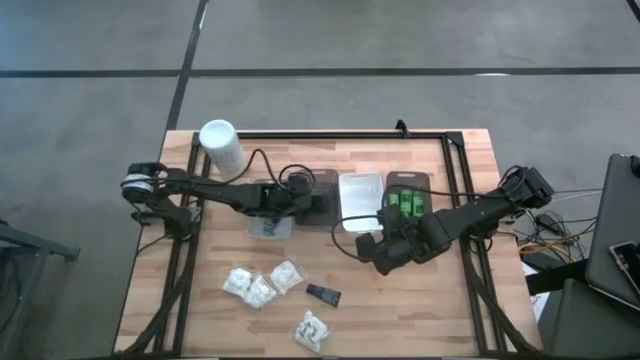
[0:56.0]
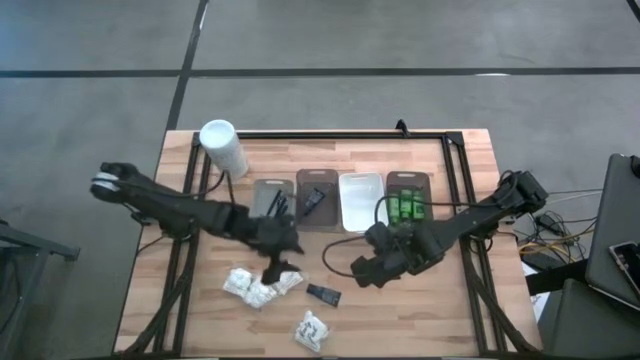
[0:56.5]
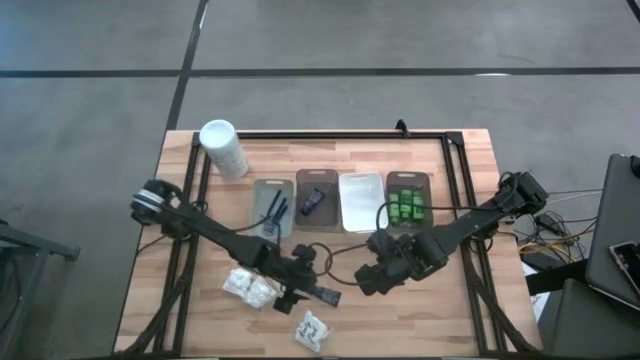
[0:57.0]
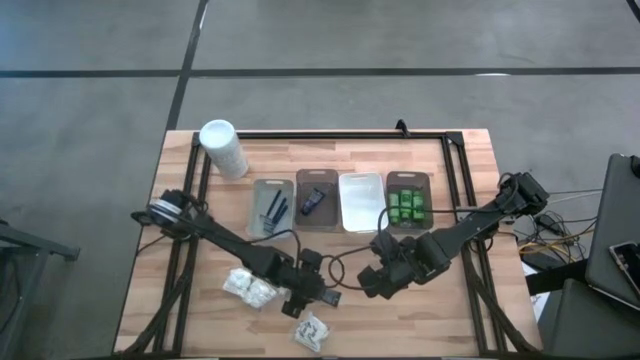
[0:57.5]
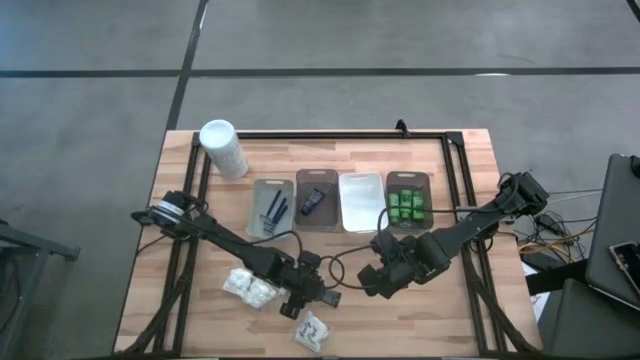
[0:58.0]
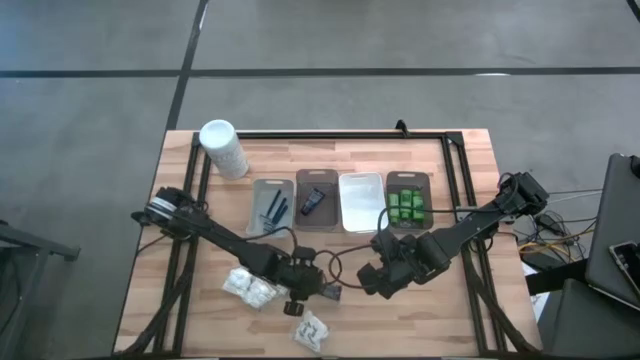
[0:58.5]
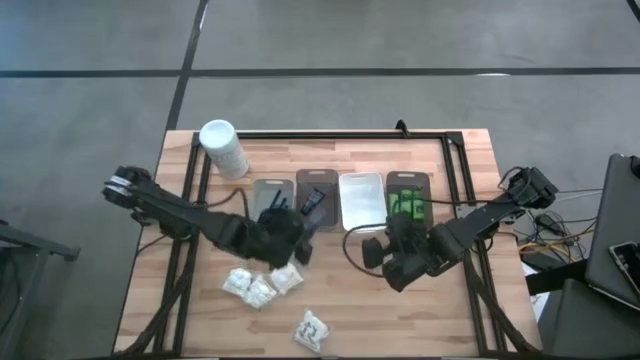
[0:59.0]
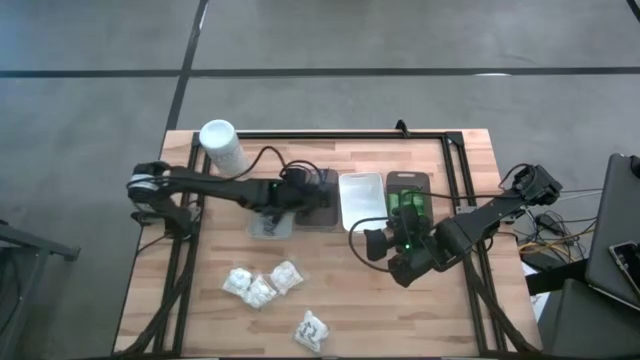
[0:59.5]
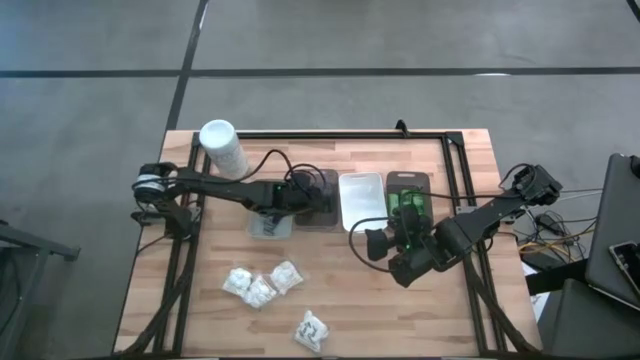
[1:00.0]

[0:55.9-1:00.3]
Task: Pick & Place Travel size toiletries
Put the blue shaving cream into the left black bin

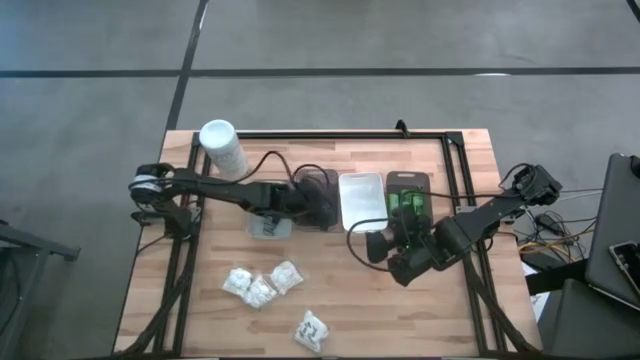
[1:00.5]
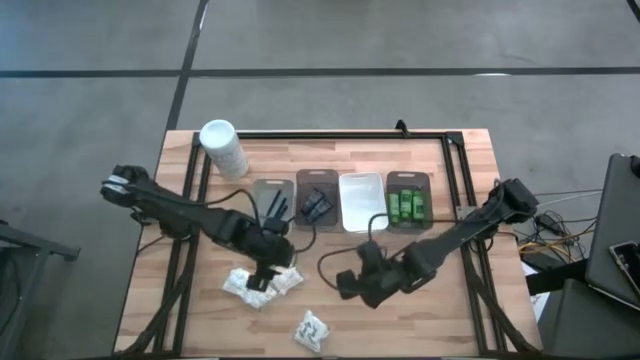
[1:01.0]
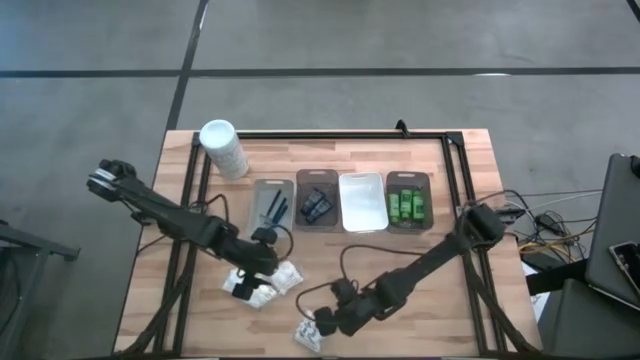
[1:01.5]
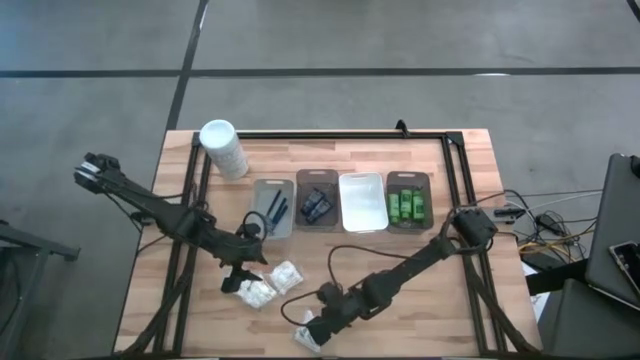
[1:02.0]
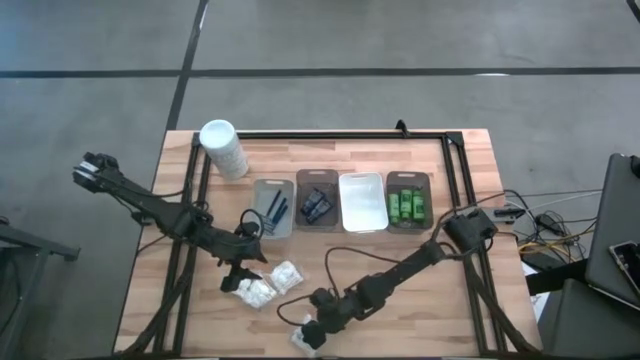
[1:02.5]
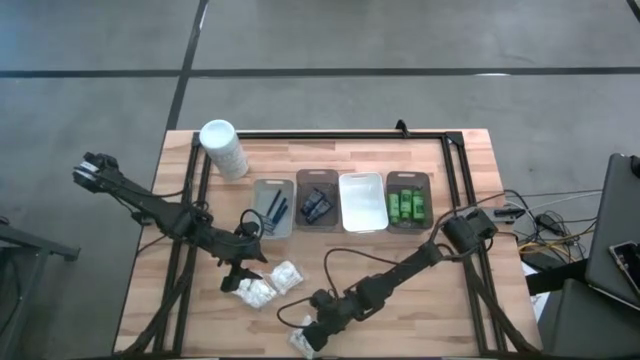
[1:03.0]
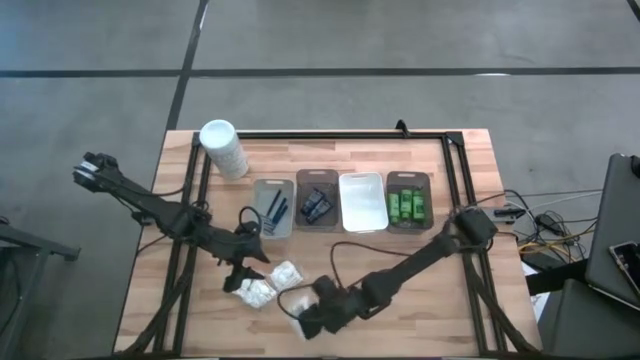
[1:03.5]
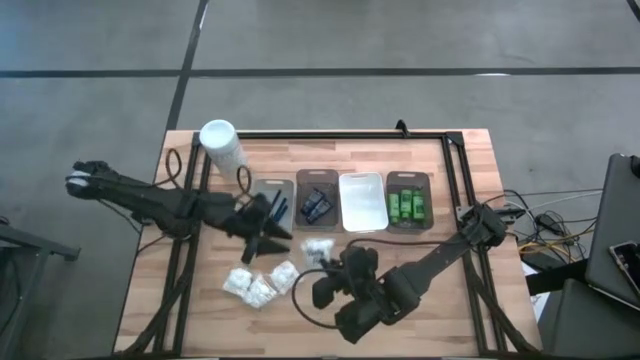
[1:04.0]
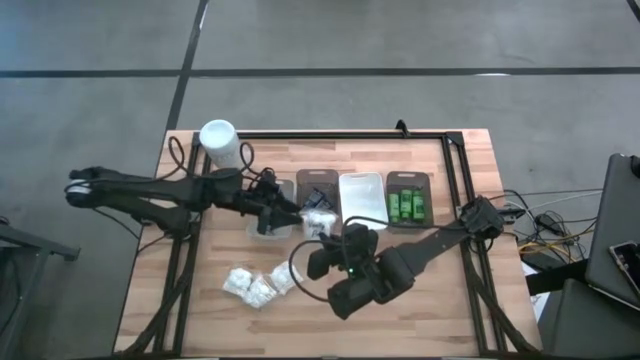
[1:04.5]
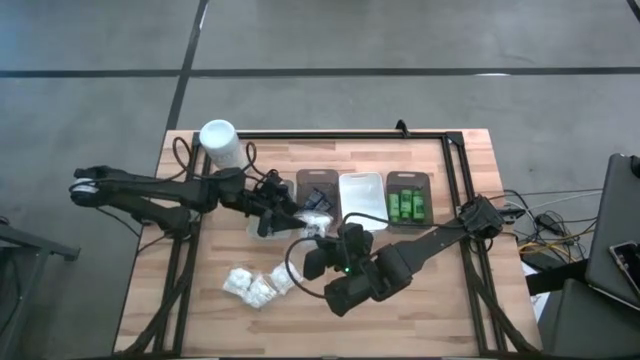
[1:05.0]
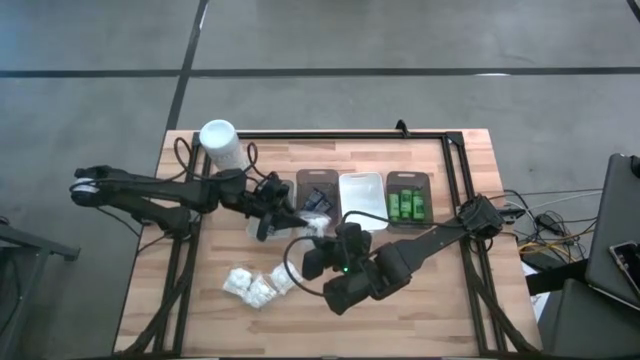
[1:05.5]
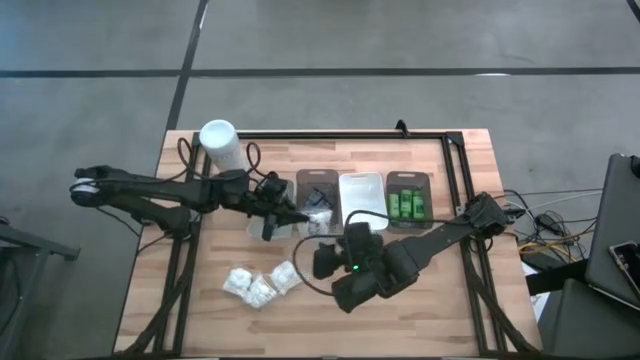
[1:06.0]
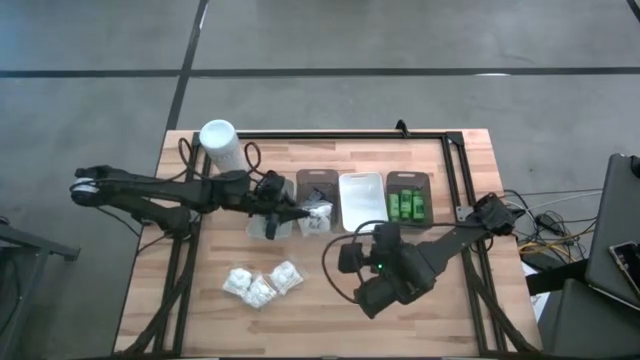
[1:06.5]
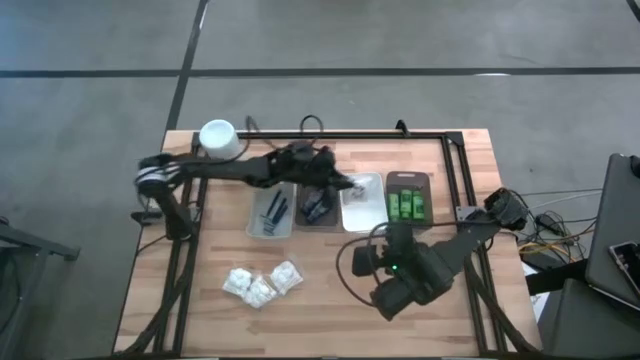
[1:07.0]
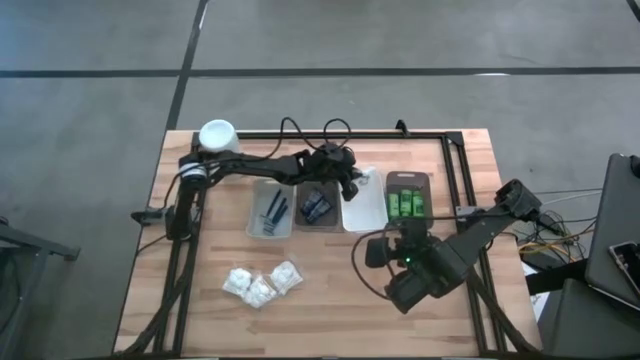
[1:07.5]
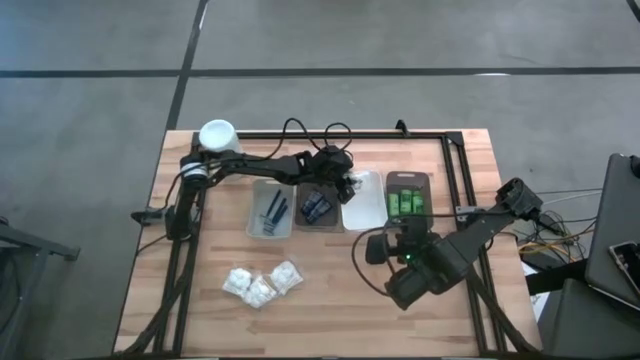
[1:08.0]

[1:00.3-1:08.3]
Put the transparent cotton pack into the white bin

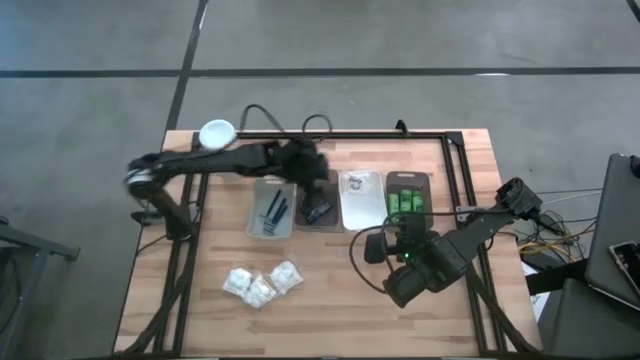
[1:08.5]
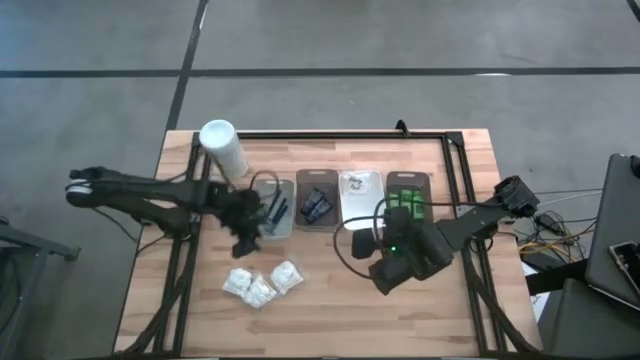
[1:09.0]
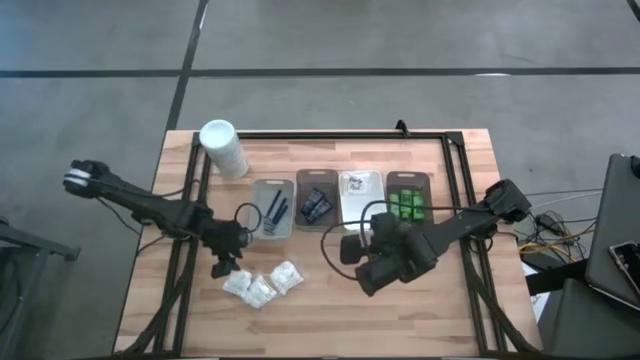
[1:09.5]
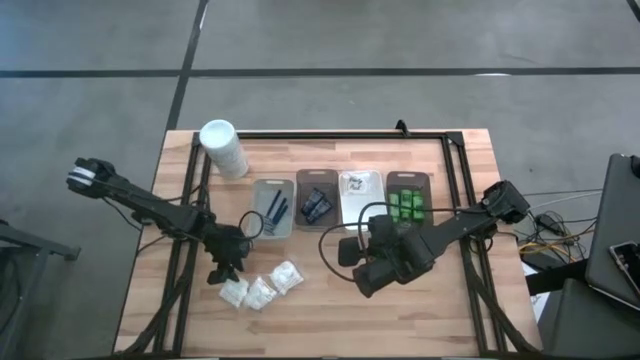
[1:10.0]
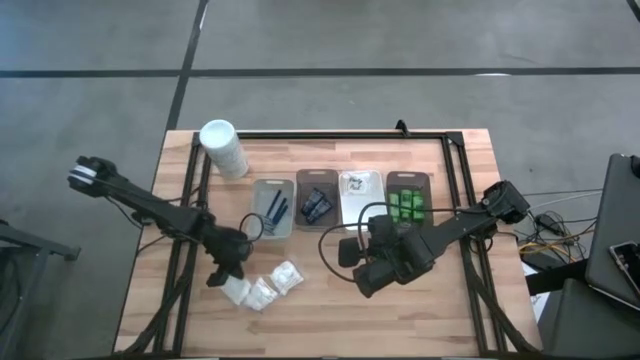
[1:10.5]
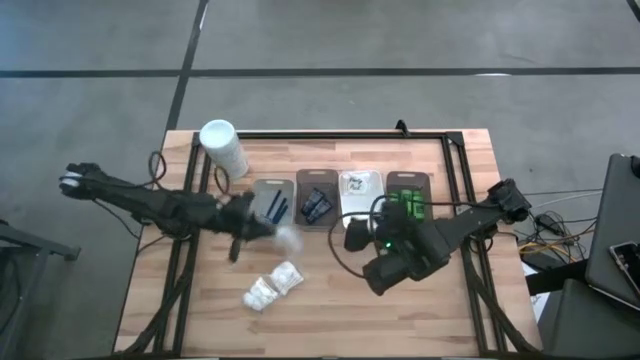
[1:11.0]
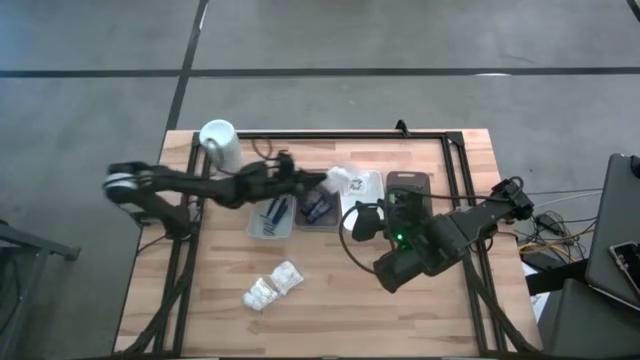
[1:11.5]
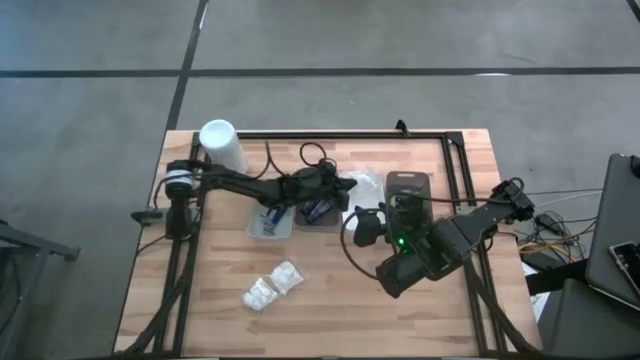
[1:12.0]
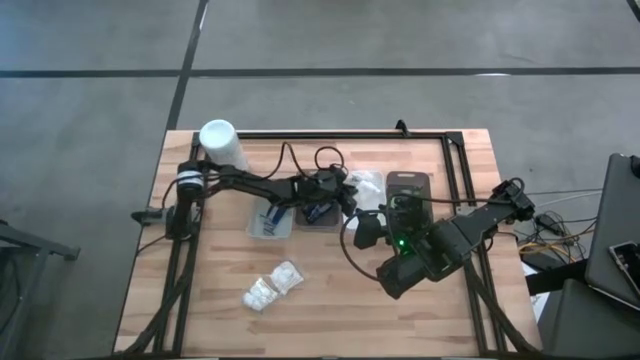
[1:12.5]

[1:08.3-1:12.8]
Put the transparent cotton pack into the white bin

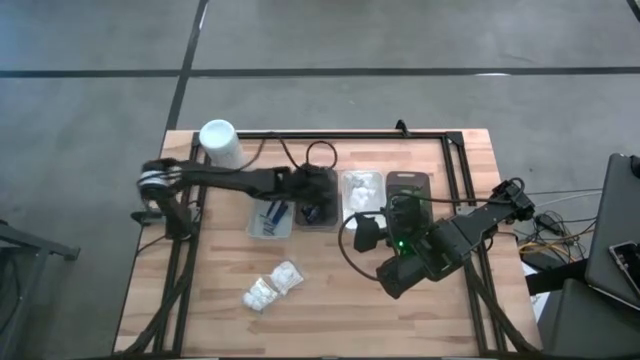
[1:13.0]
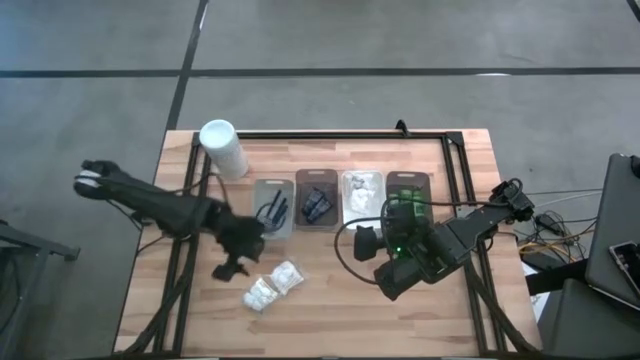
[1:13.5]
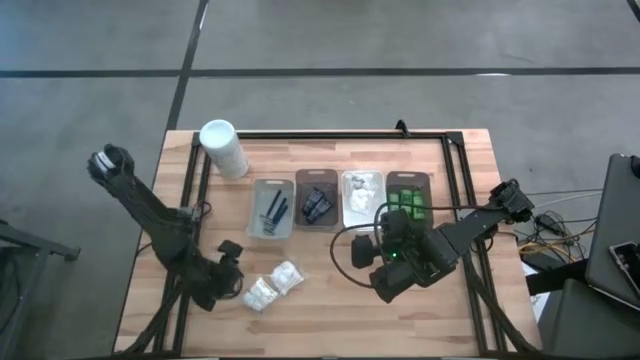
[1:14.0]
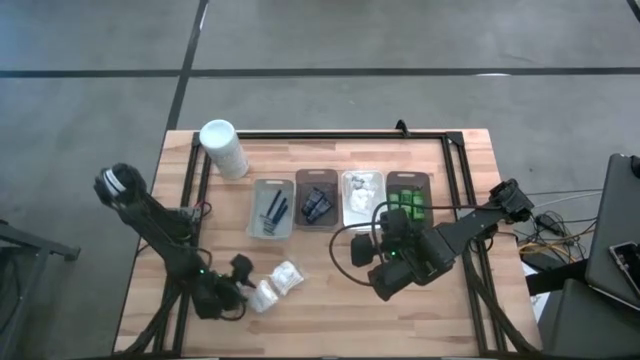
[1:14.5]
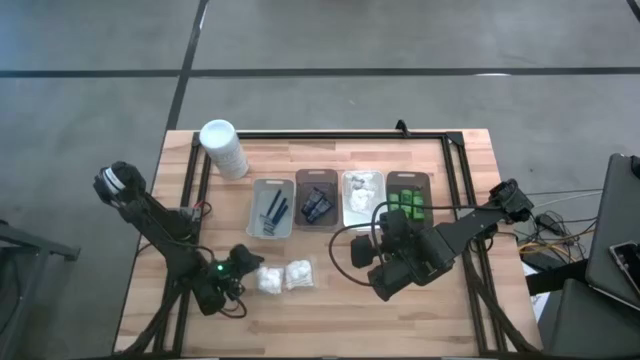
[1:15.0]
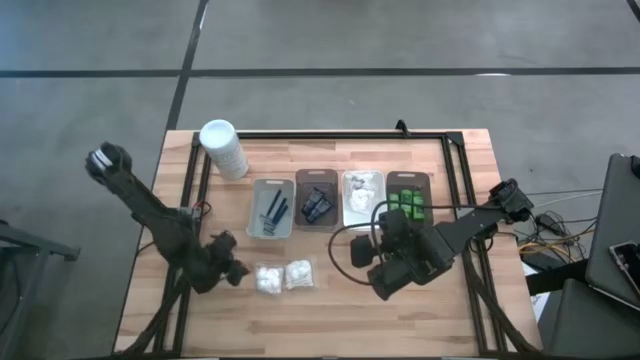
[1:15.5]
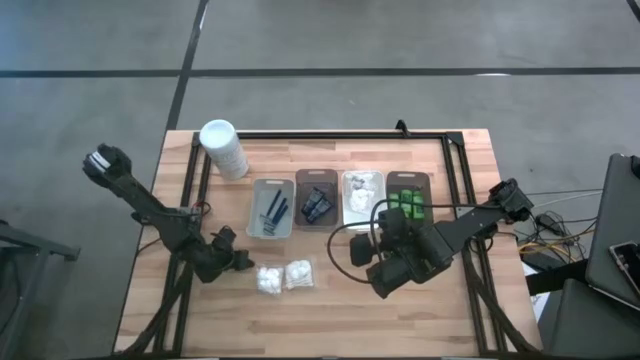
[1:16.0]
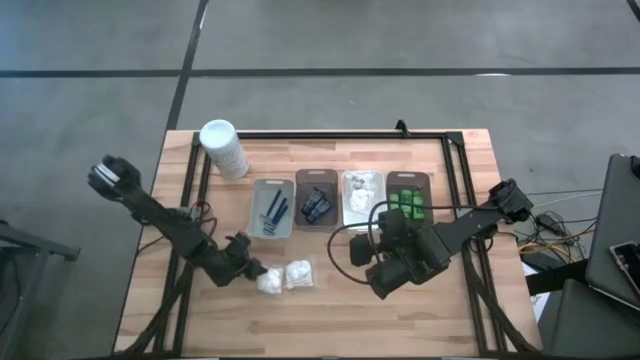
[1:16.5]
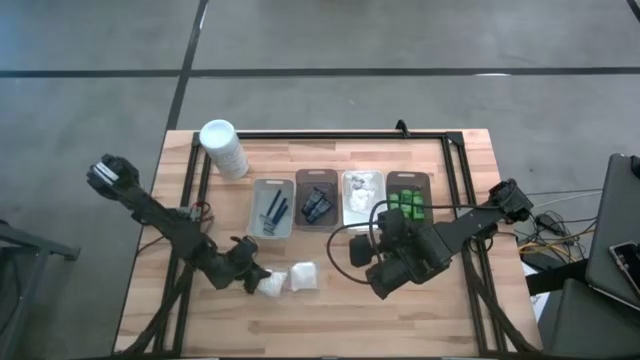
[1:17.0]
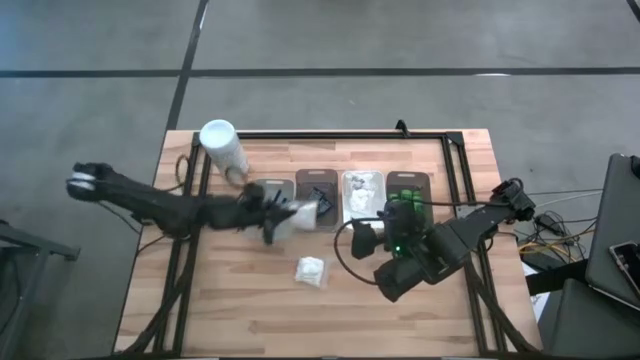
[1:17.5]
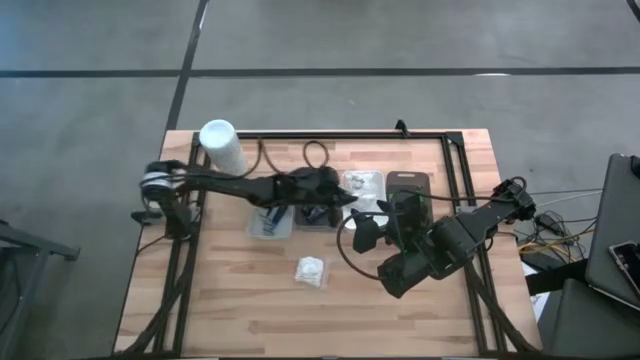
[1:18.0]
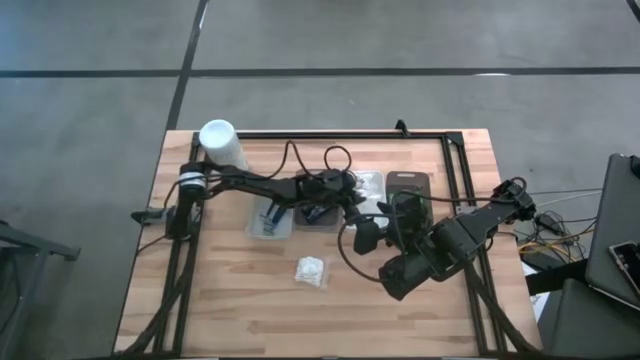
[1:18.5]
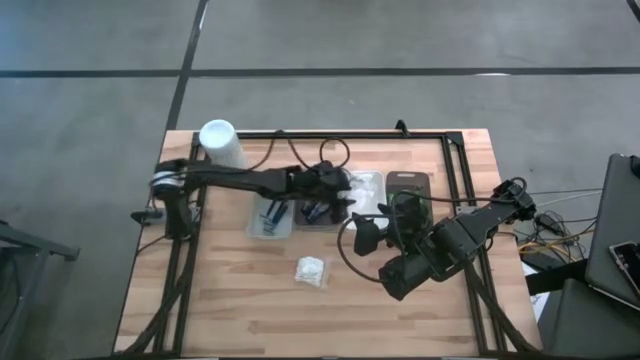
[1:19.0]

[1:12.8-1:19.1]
Put the transparent cotton pack into the white bin
